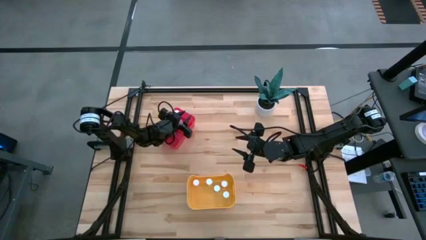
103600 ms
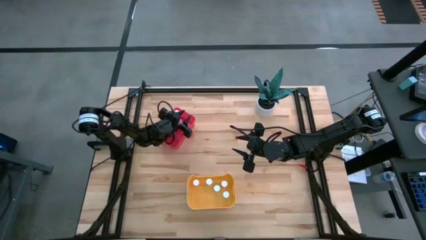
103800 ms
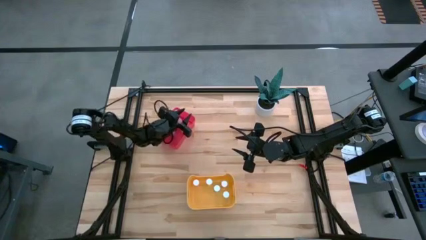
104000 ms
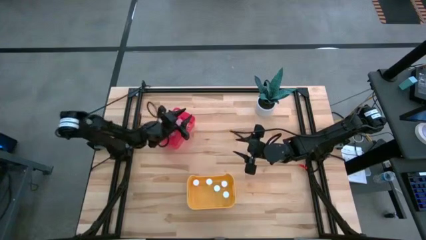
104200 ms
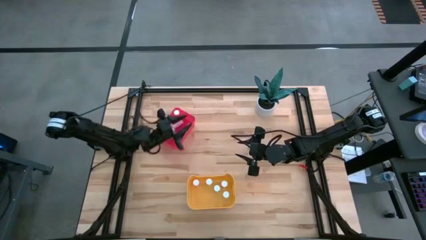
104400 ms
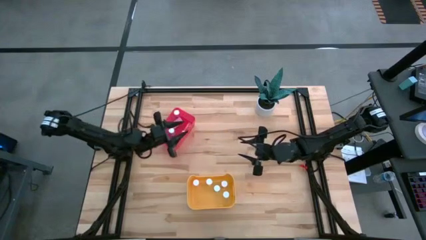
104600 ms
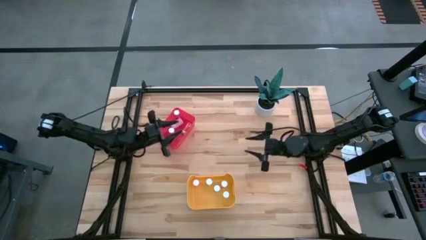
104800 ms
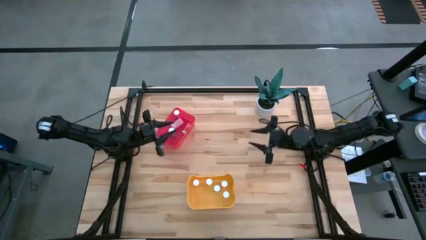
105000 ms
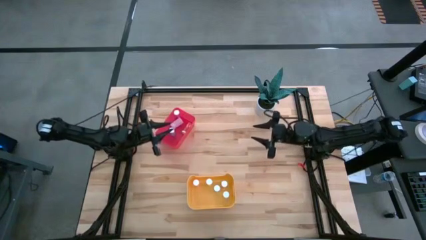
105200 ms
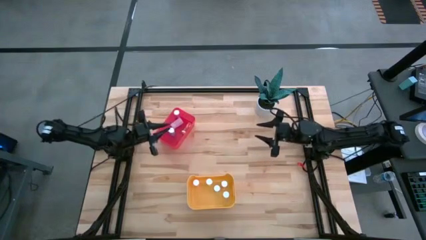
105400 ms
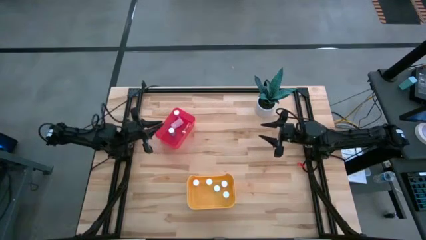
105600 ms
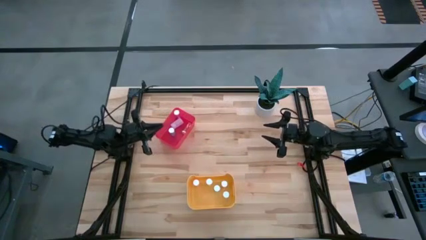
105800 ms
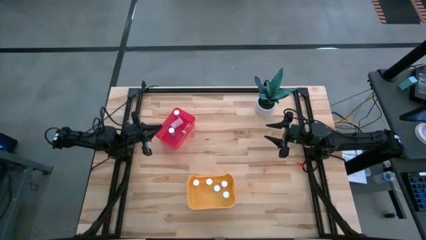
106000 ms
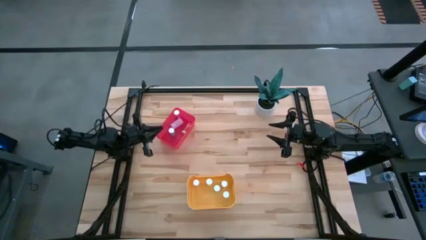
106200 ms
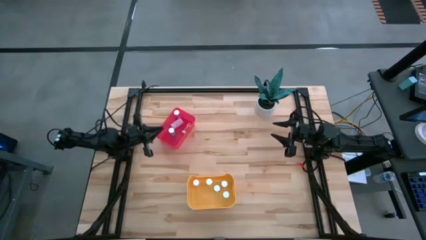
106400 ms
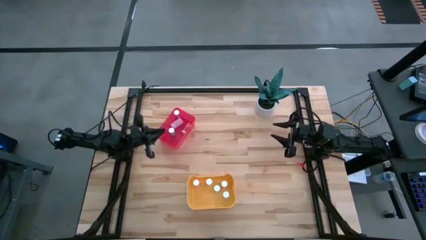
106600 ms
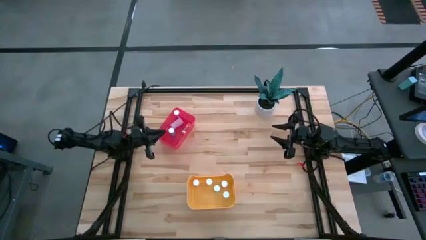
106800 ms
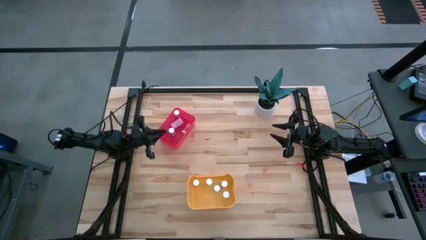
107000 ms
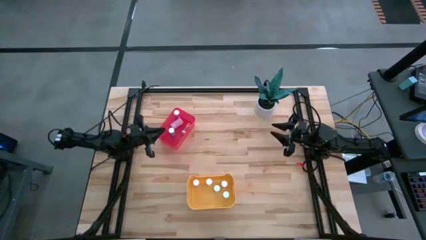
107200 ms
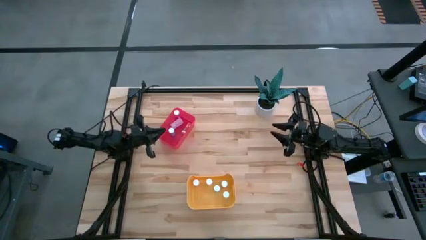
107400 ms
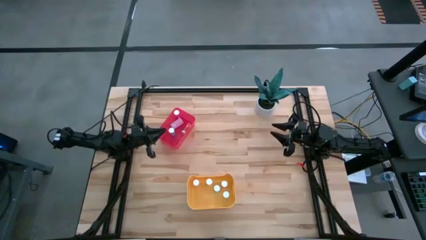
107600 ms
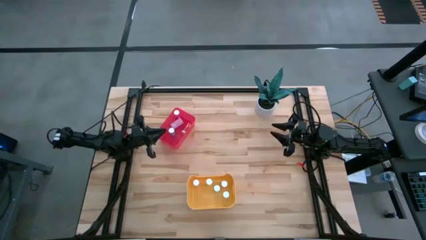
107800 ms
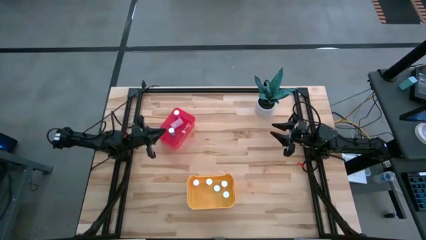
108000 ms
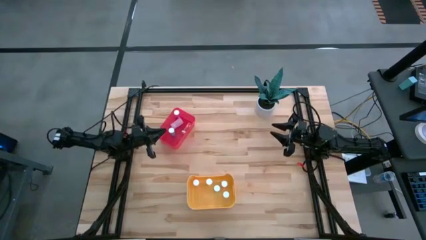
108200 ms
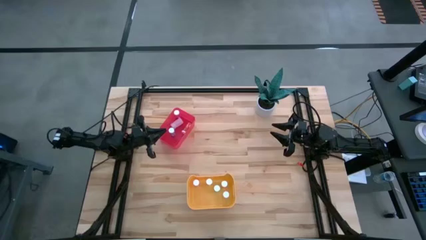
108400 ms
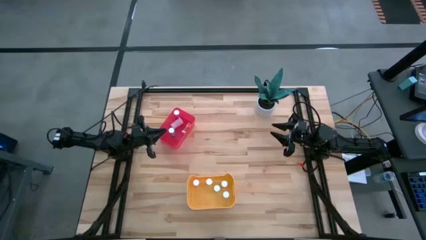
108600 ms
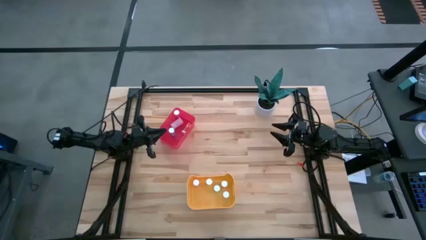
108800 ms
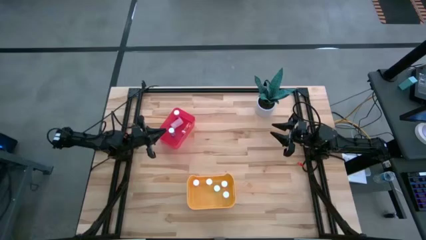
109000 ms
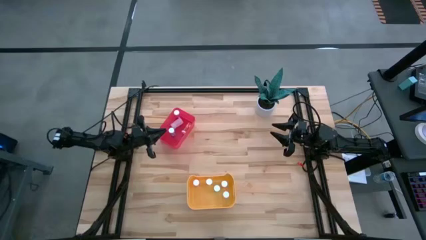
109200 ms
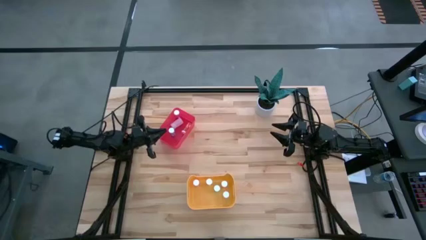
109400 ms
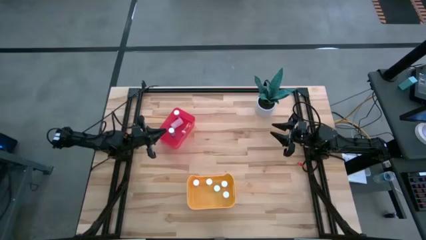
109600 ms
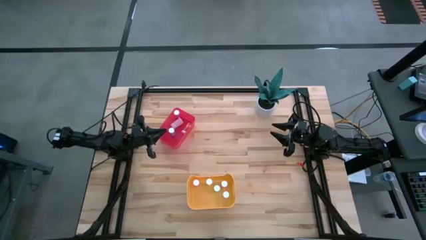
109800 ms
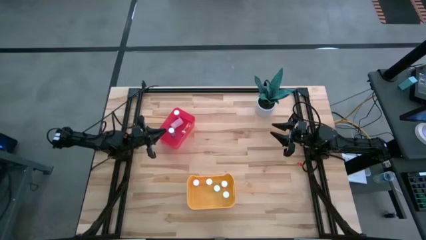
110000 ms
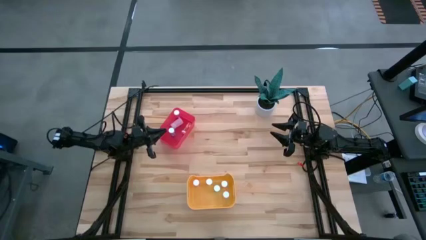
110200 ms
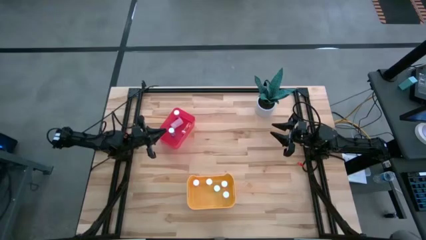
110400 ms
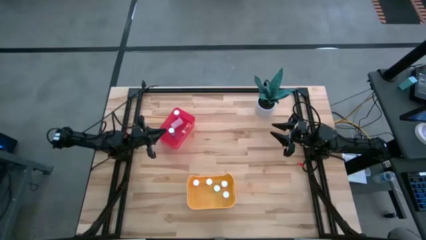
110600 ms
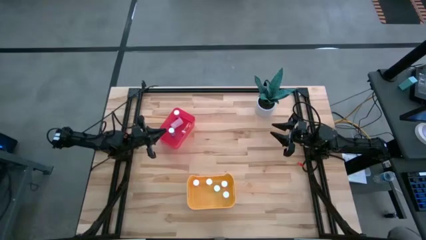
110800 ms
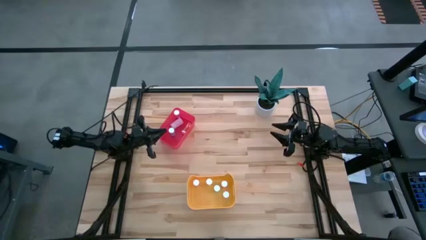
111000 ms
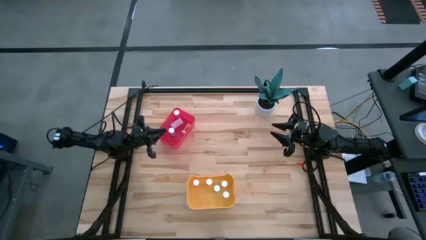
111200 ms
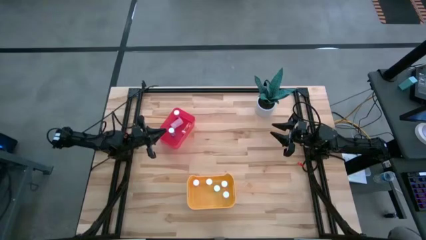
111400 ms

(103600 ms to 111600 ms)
Task: Pick and place medicine bottles into bin by pill shape (circle, oval)
Return to Home Position

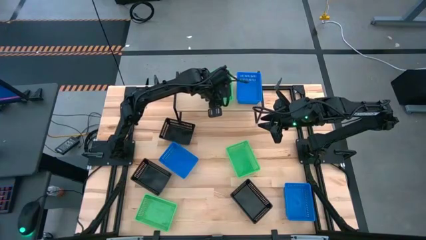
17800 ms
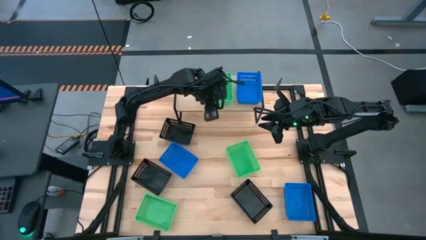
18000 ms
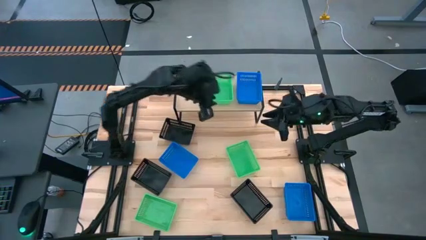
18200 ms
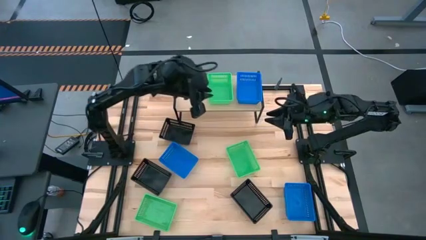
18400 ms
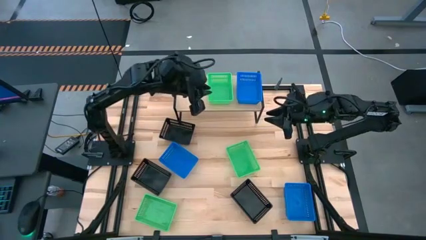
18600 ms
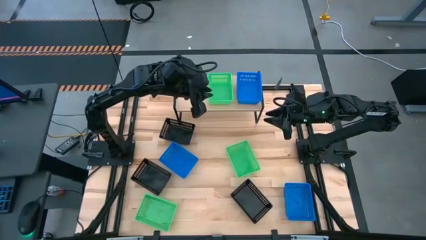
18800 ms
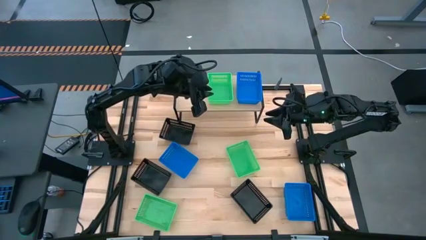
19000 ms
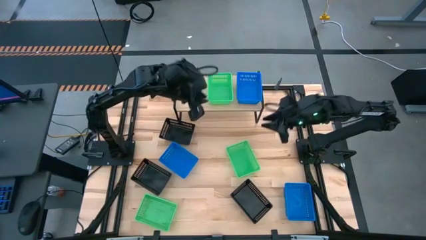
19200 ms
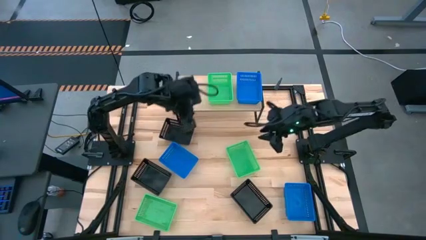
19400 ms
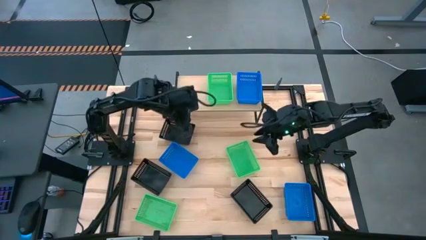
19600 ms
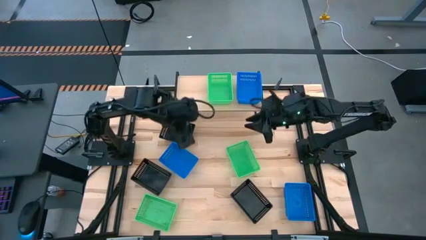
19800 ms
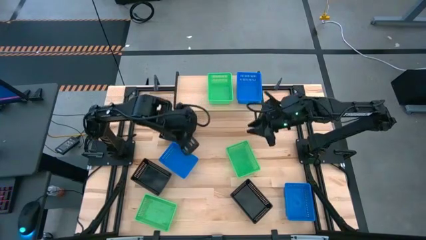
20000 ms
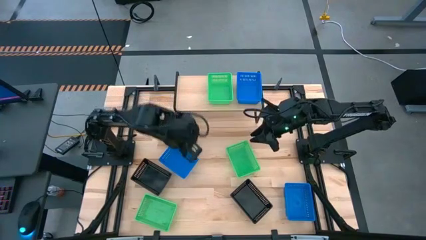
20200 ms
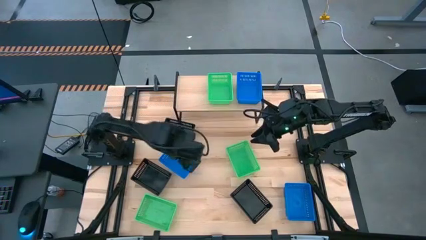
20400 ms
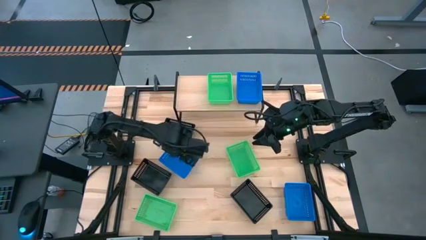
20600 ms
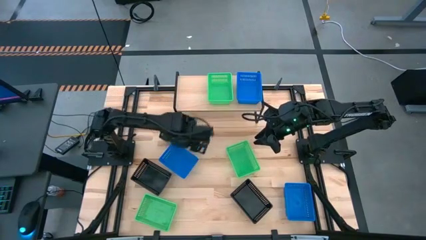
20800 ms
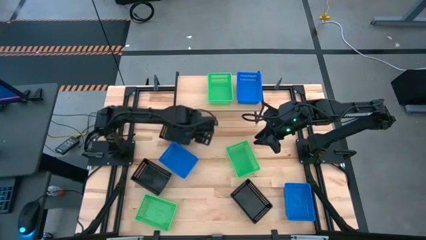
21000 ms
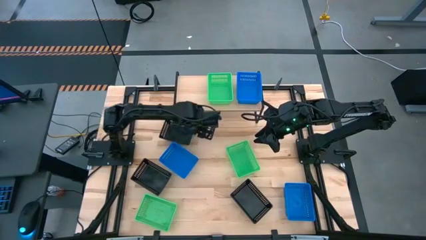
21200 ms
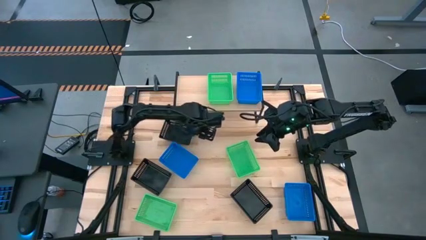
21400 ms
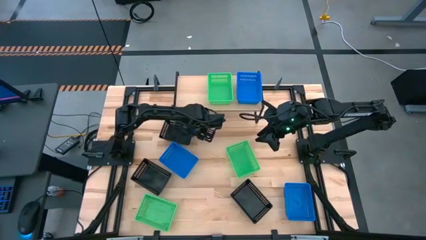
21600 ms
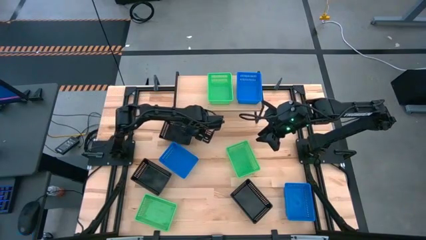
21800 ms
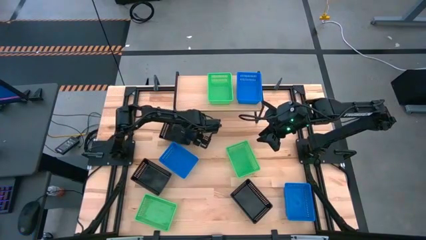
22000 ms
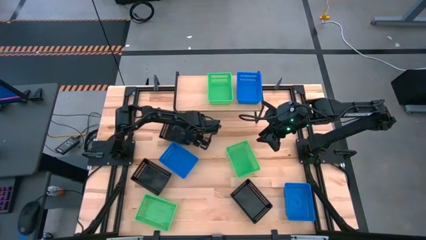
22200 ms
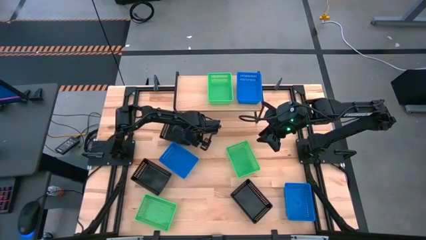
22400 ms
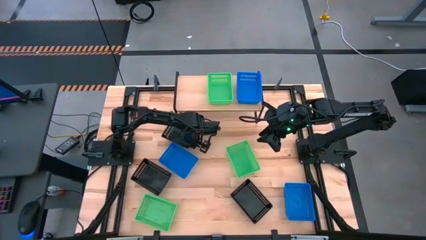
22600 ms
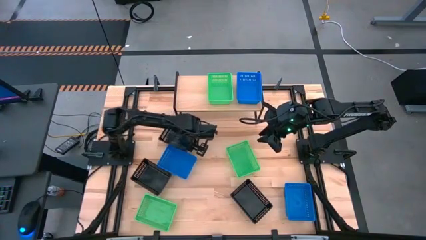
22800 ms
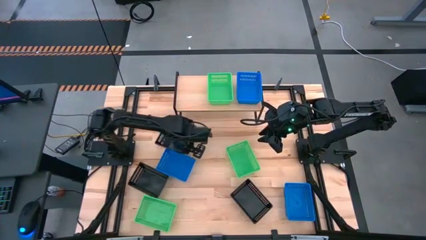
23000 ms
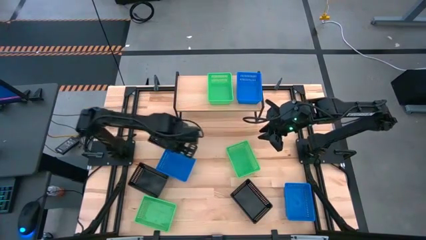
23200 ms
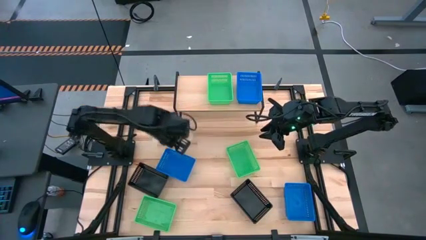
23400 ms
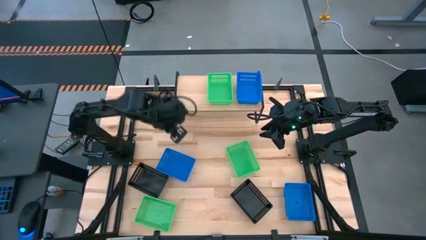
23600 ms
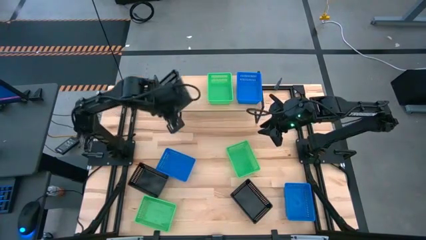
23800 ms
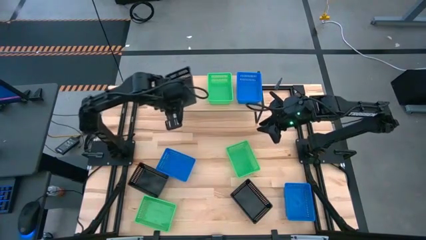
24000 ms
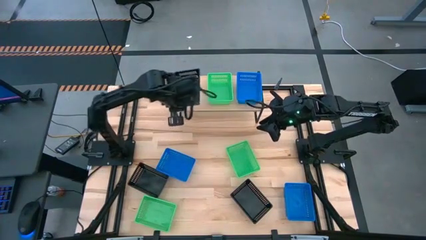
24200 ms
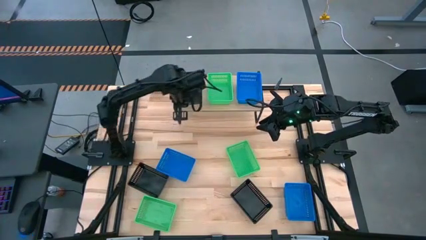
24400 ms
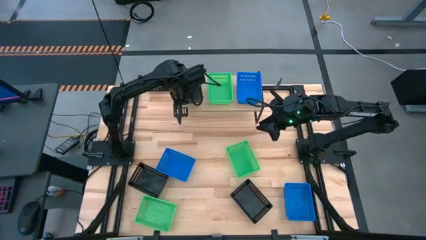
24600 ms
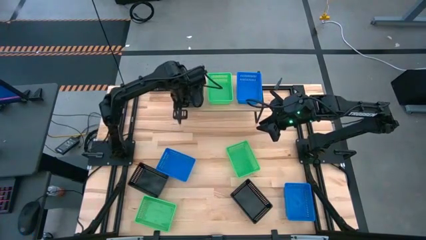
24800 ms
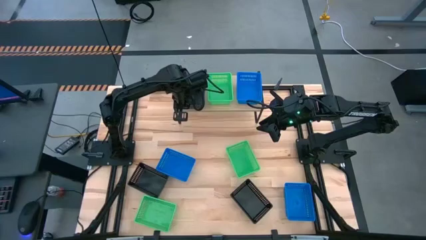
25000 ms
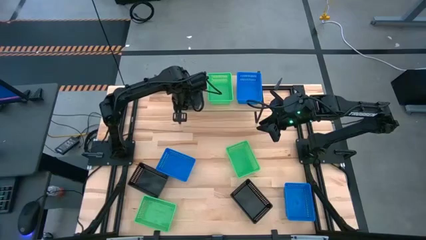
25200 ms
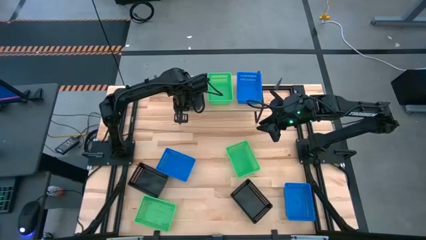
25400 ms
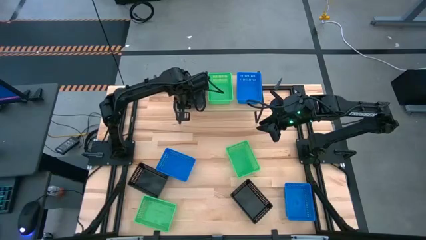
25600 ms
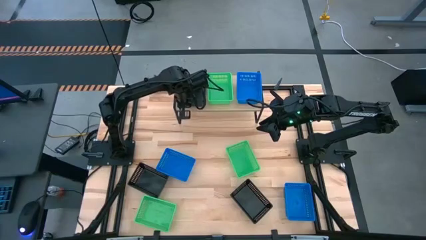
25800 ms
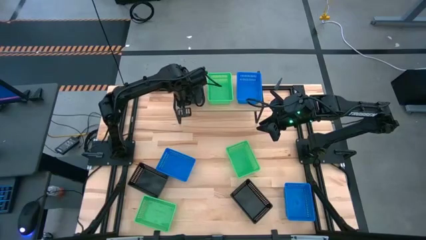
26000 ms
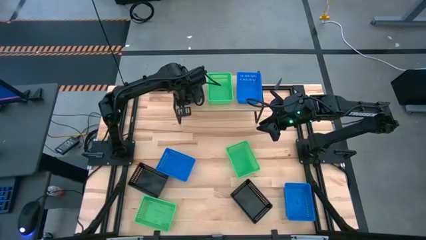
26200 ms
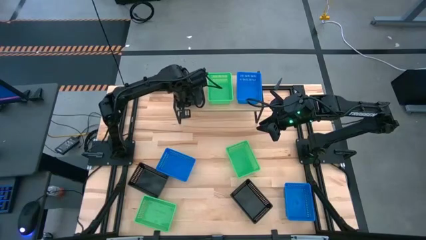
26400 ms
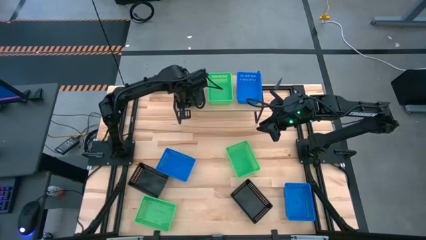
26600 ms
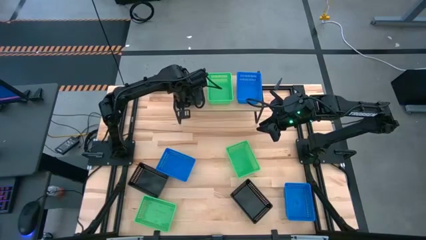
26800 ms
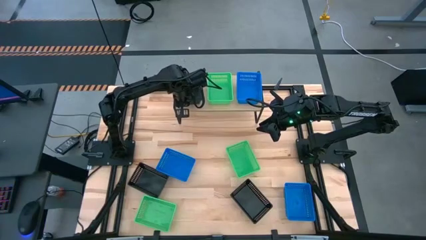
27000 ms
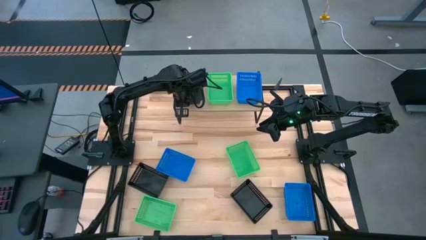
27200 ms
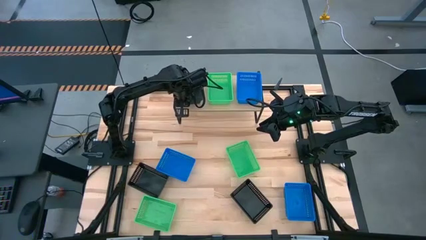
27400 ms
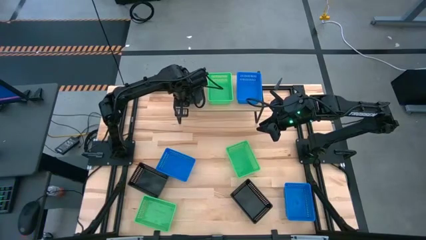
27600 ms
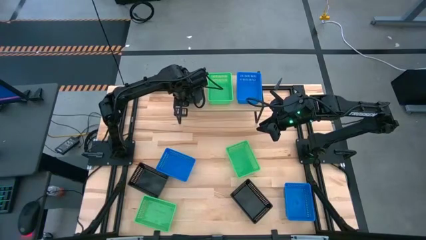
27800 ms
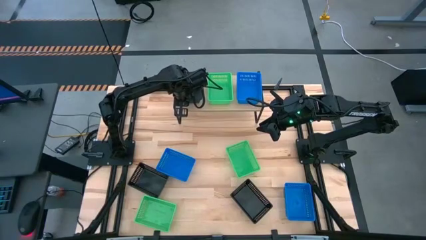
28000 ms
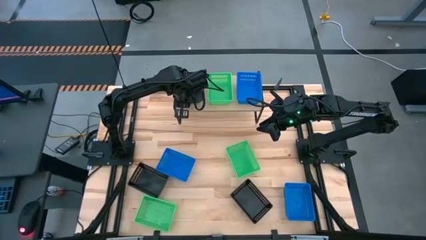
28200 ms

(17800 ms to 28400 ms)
Task: Stack baskets on shelf by color
Put the top black basket on the shelf
